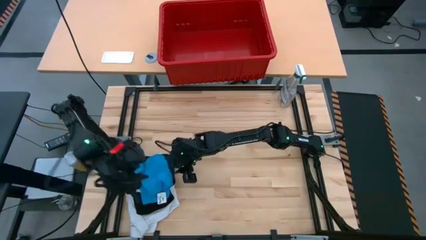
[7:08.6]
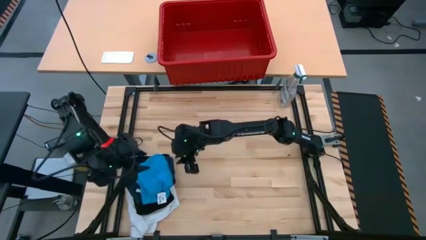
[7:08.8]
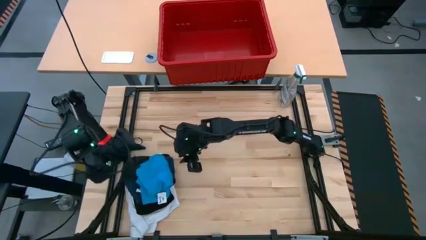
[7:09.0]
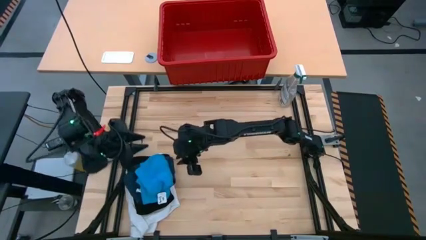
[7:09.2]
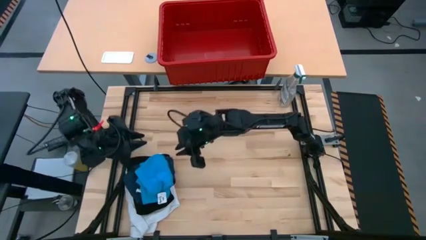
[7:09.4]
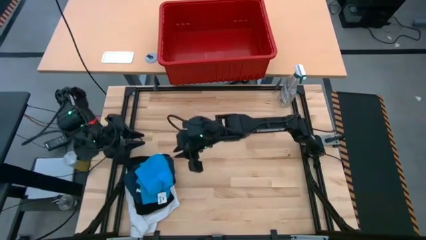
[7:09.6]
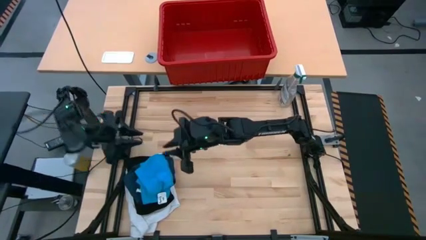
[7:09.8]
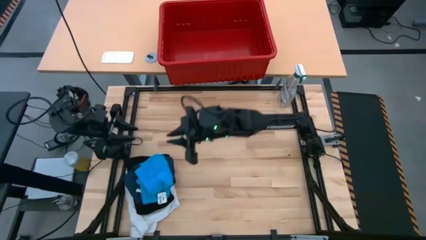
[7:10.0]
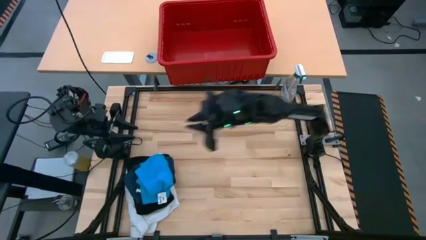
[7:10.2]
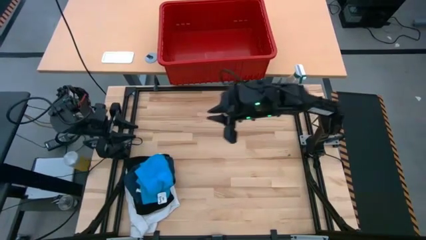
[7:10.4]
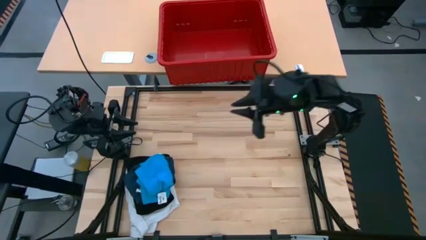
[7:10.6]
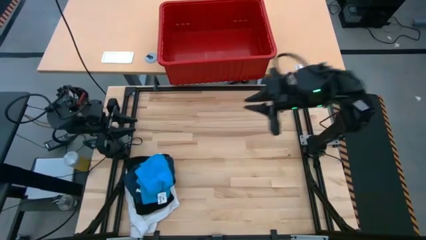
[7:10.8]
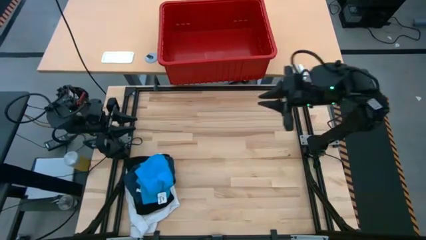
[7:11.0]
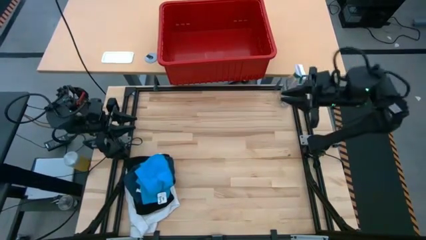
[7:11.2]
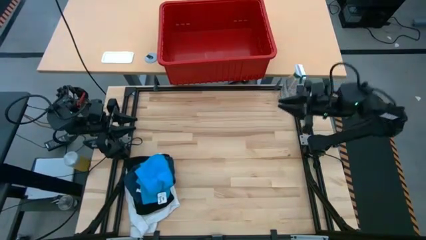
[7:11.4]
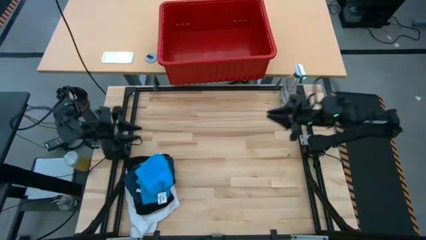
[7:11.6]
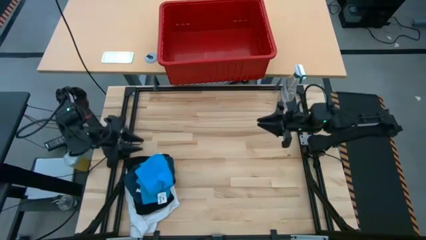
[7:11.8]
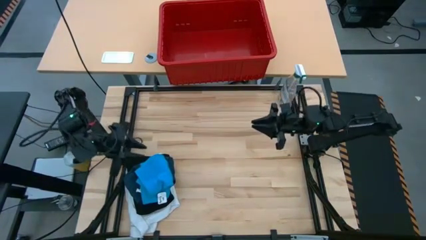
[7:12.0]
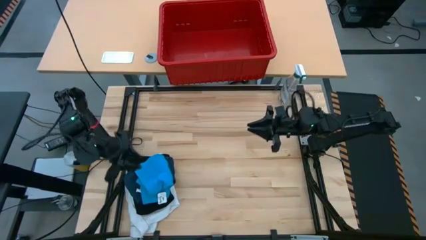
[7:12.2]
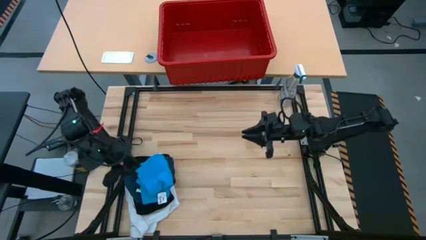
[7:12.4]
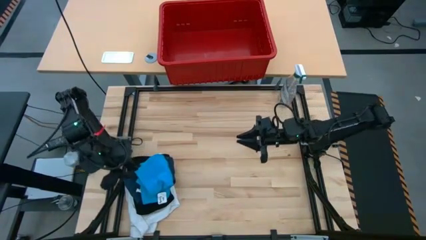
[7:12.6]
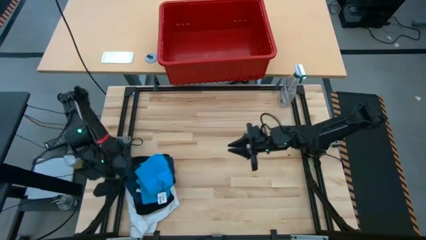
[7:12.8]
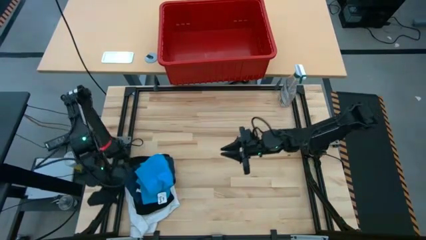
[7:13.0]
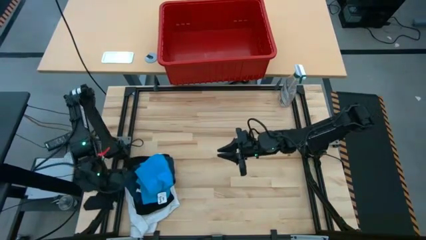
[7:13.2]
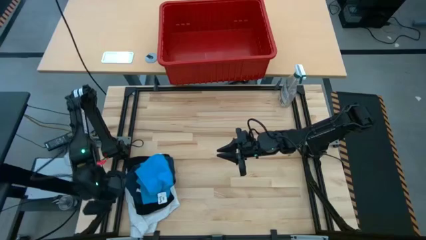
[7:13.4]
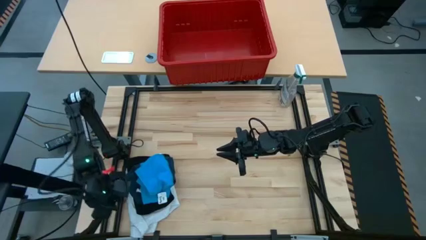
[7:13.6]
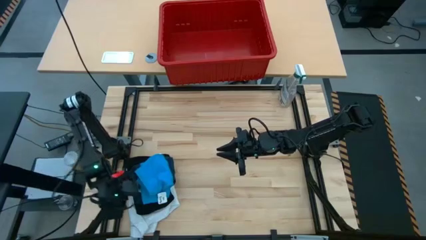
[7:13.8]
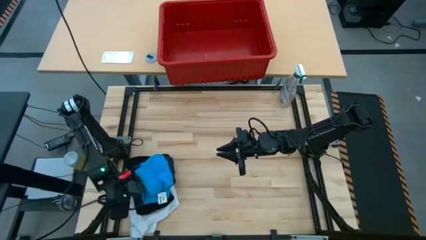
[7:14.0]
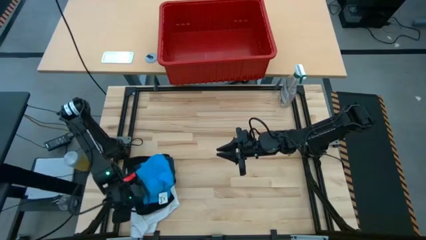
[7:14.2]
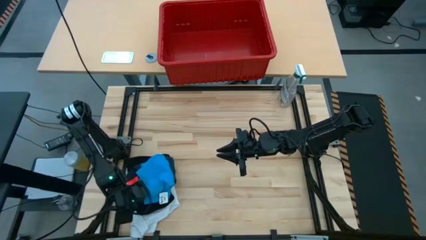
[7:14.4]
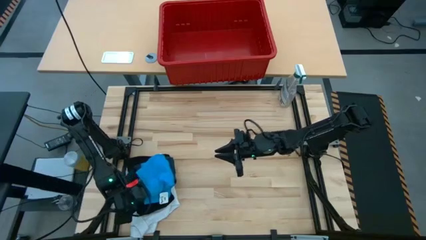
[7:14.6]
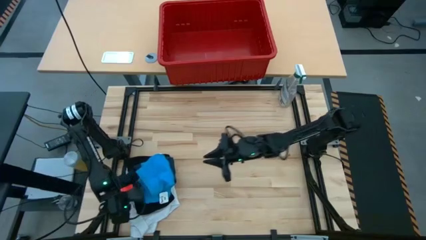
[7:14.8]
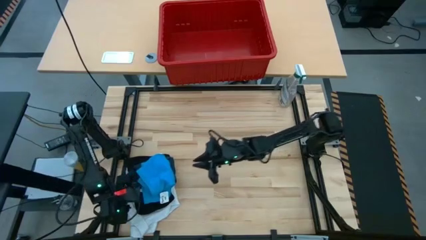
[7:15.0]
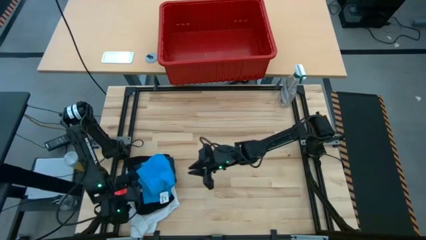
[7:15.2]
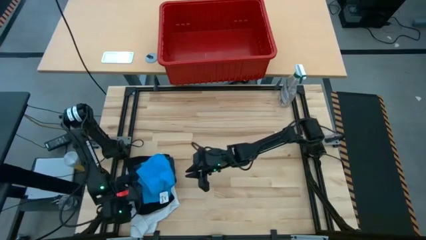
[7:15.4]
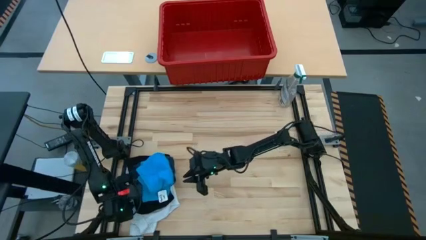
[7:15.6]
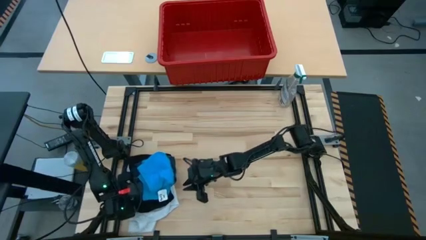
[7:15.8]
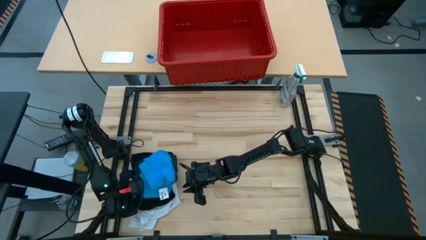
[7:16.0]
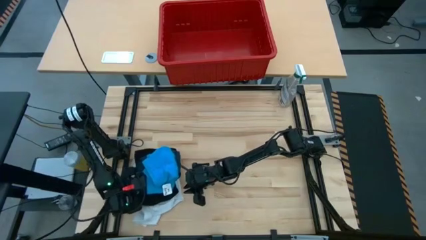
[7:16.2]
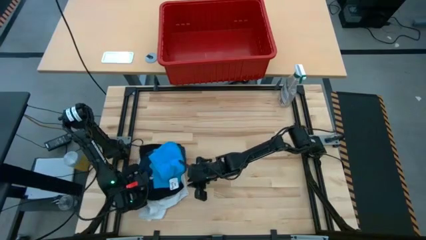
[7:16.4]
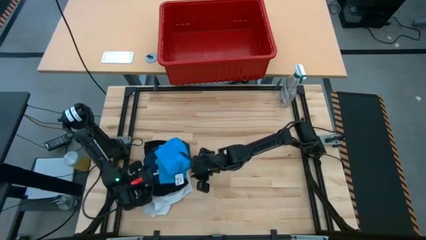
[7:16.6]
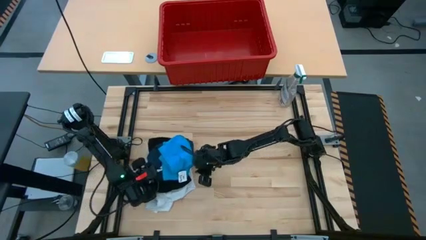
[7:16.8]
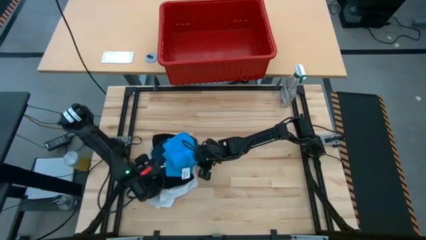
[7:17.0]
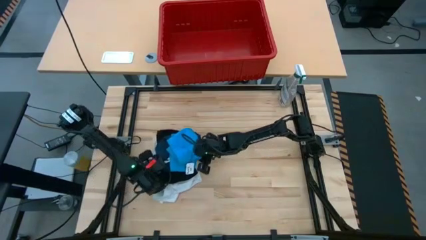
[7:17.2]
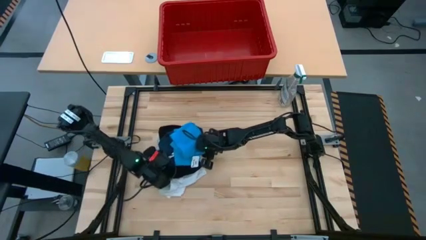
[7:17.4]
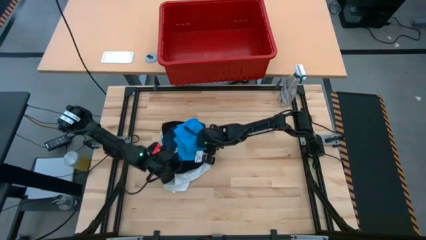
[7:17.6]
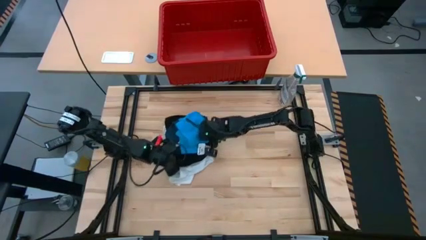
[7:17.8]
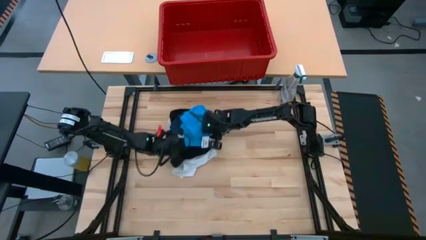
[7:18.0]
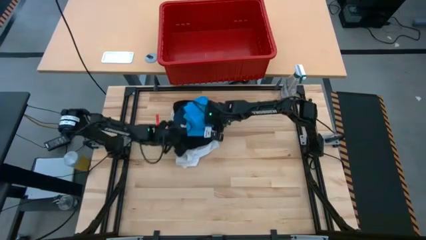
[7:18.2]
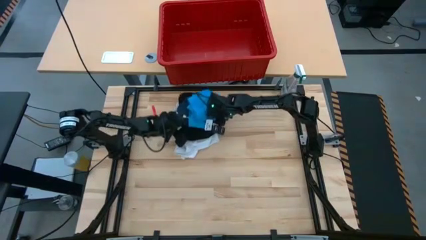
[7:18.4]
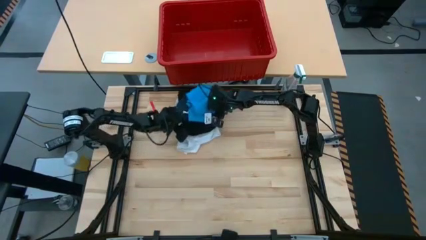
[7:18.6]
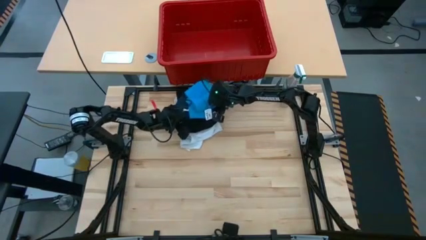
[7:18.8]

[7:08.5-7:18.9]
Task: Fold Laundry from Bin
Put all the stacked clothes into the red bin

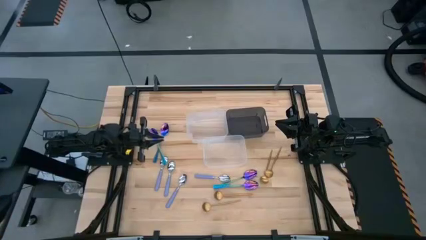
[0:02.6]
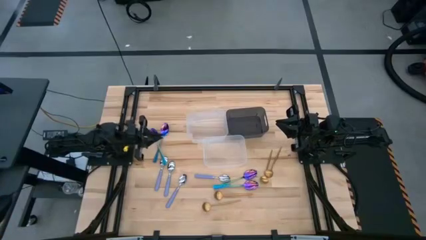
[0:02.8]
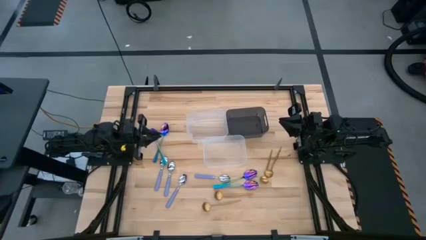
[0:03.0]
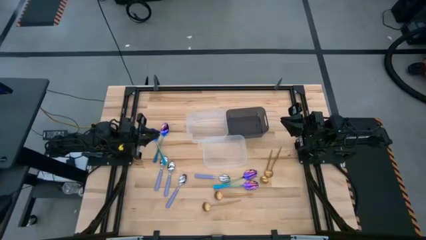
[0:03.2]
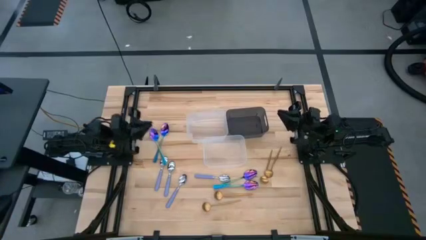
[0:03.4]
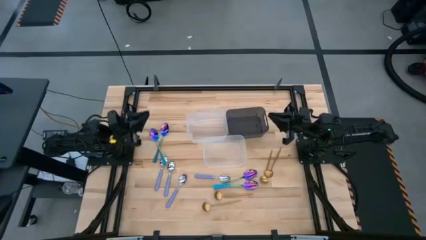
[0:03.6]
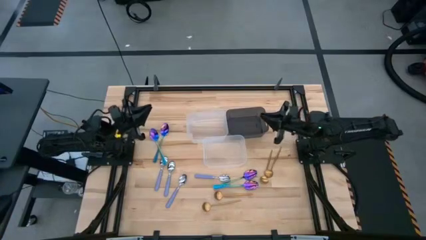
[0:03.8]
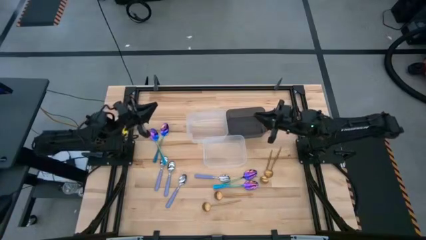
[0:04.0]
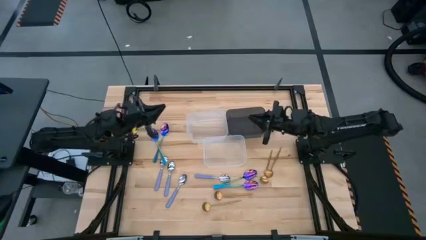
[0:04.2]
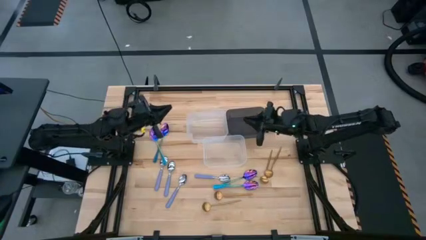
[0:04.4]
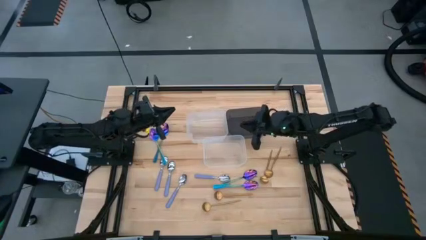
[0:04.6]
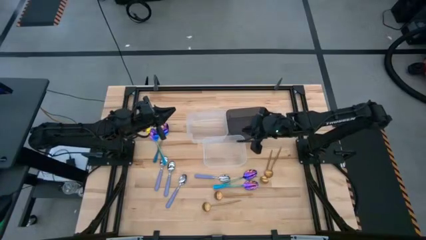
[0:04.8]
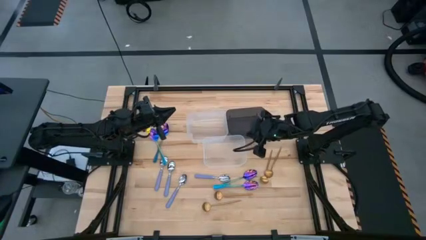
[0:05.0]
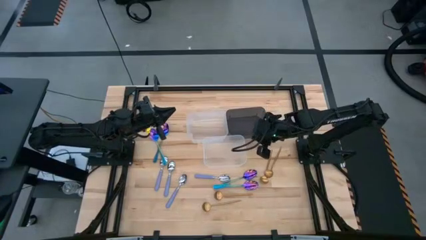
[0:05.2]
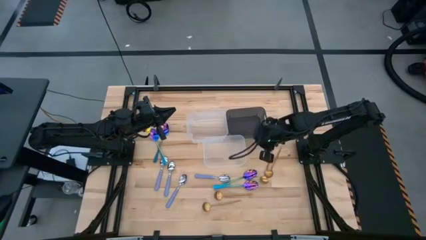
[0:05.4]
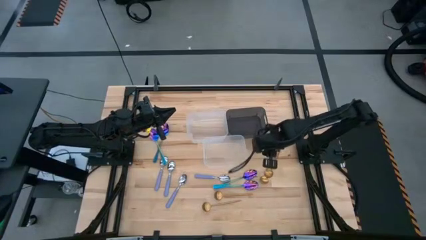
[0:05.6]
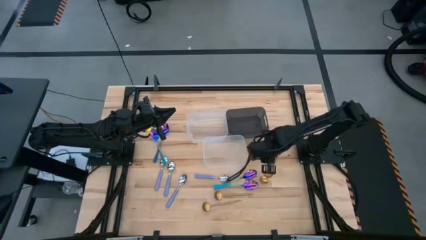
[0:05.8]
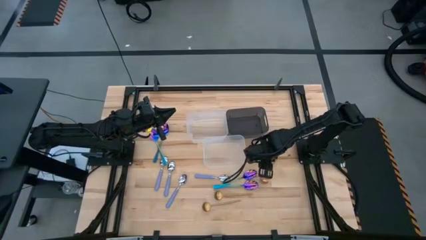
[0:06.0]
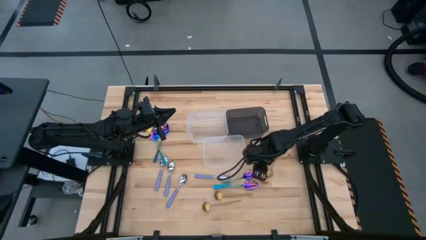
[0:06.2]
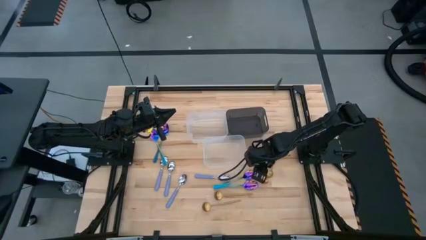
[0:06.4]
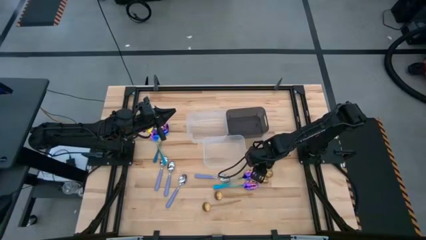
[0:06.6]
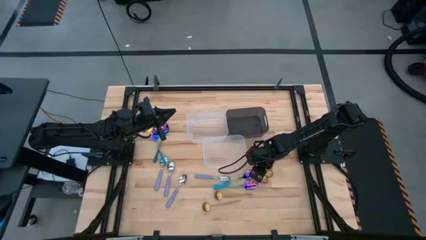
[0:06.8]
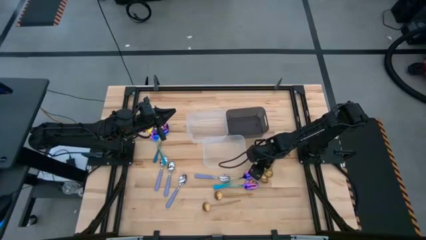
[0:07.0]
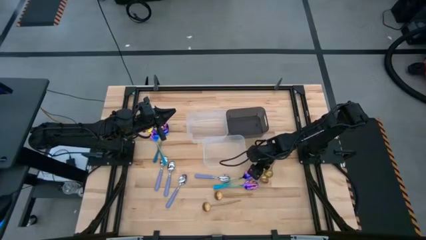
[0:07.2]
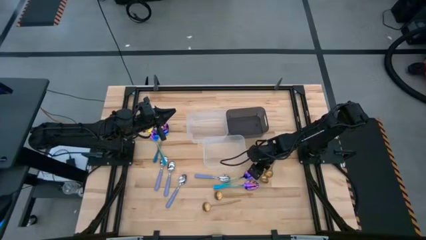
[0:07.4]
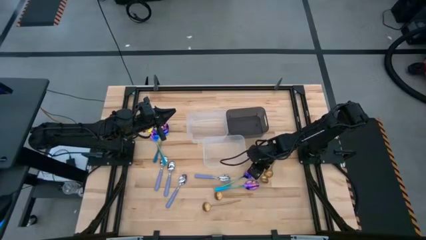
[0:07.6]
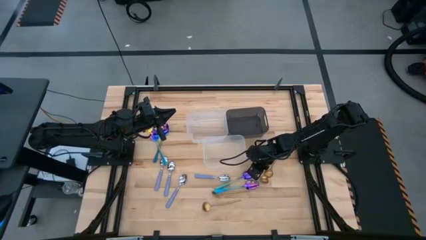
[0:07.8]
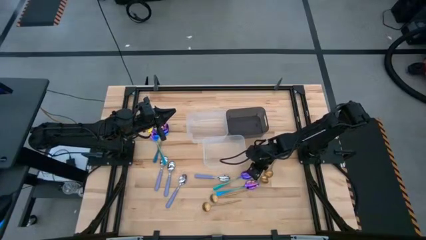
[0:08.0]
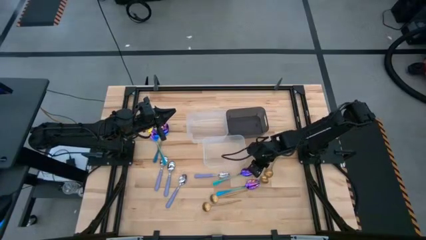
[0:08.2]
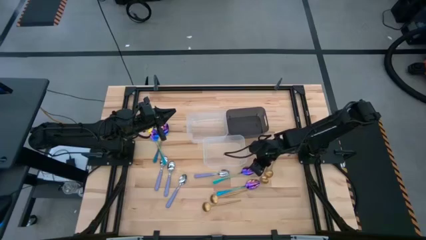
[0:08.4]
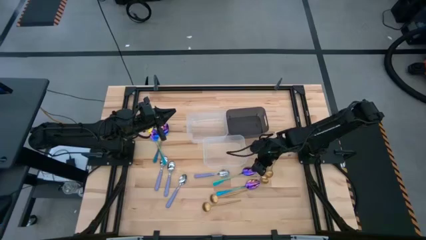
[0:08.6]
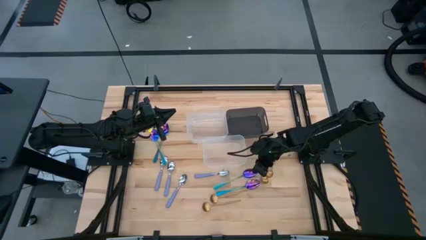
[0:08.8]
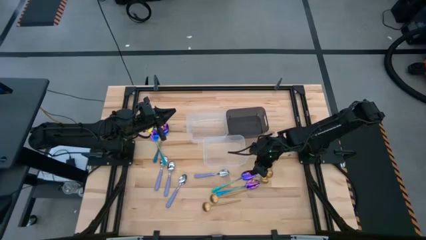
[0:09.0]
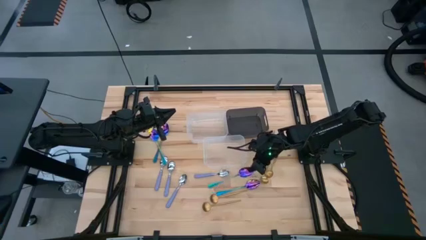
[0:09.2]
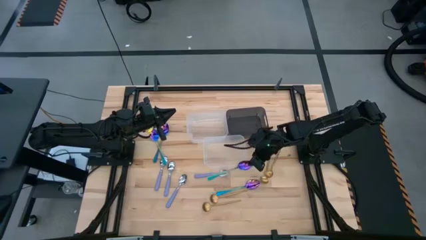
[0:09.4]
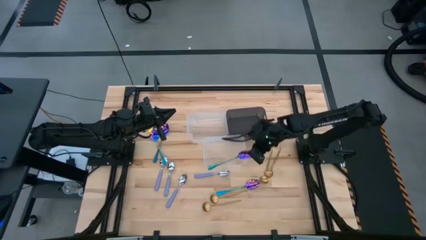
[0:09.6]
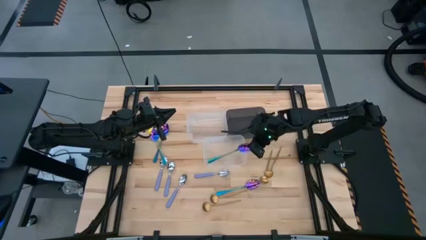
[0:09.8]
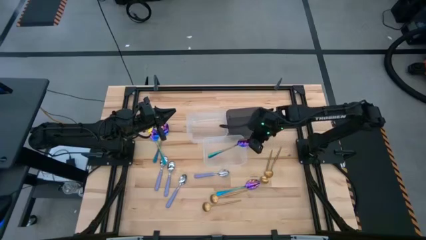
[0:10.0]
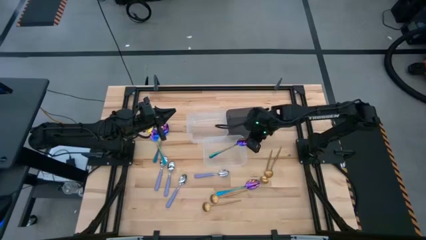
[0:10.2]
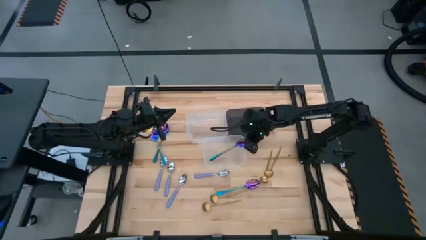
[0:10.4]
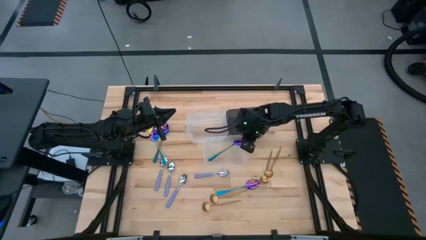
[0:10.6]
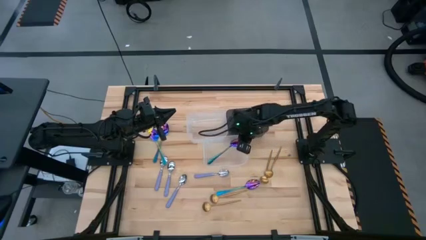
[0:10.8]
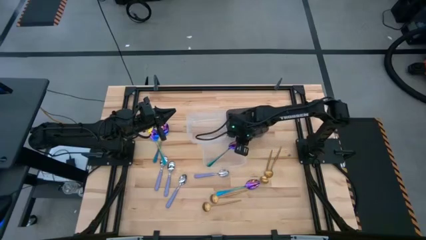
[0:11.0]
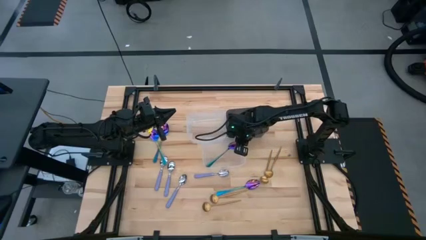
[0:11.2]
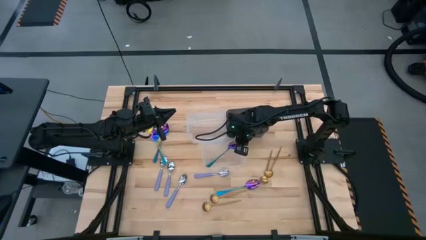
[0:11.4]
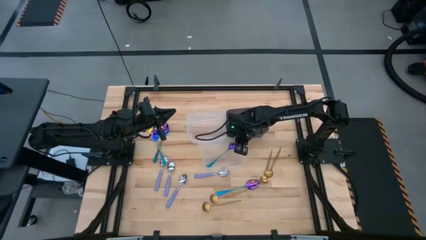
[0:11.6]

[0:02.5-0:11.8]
Task: Sort silverware by color (type)
Put the purple spoon into the bottom transparent bin
